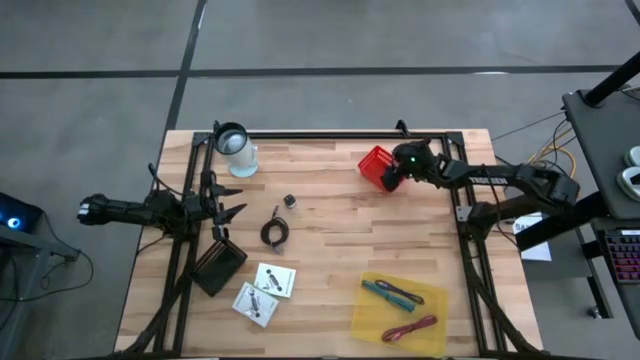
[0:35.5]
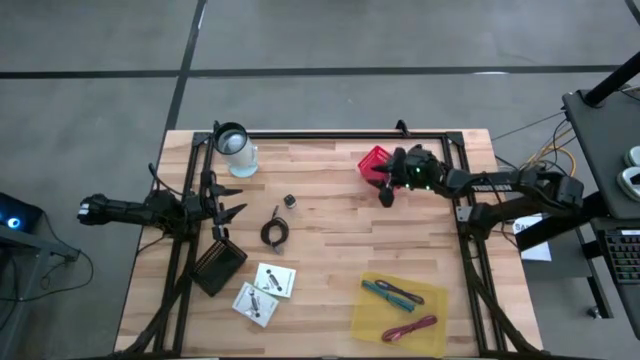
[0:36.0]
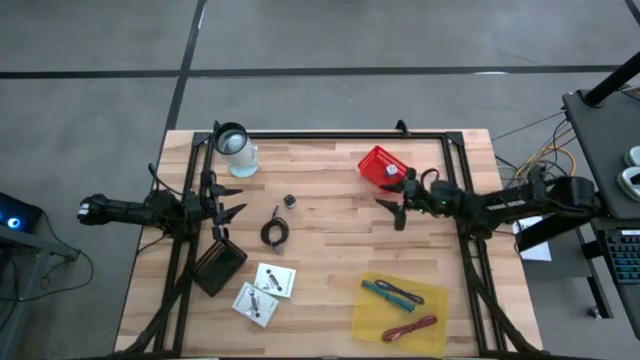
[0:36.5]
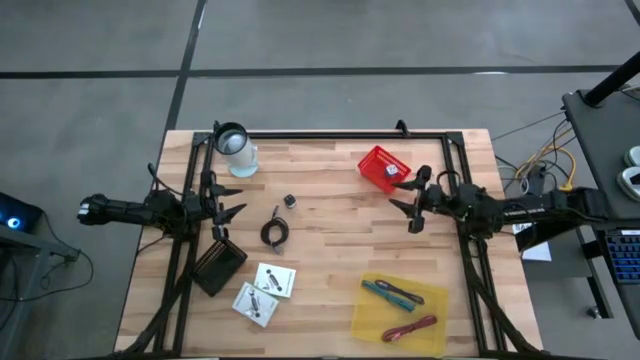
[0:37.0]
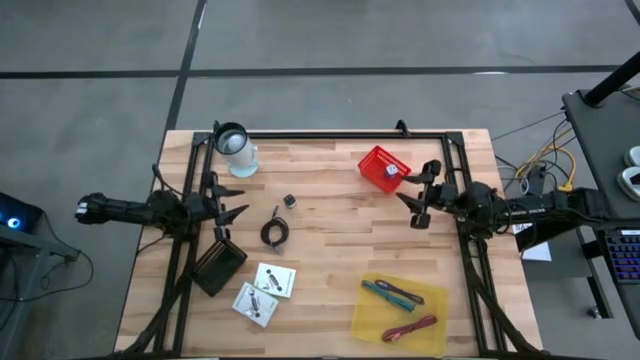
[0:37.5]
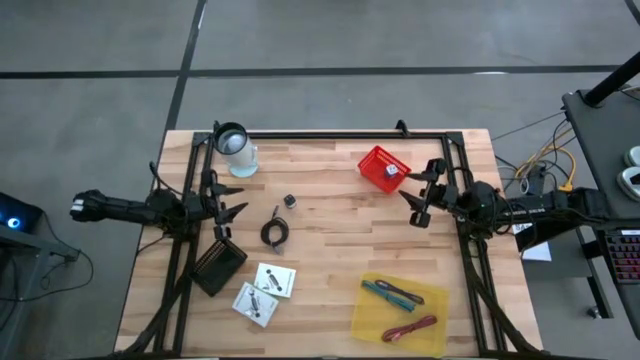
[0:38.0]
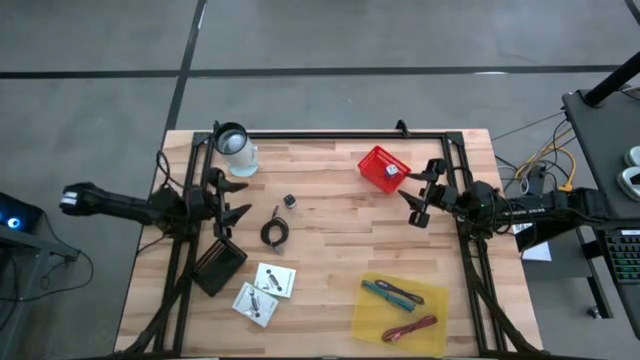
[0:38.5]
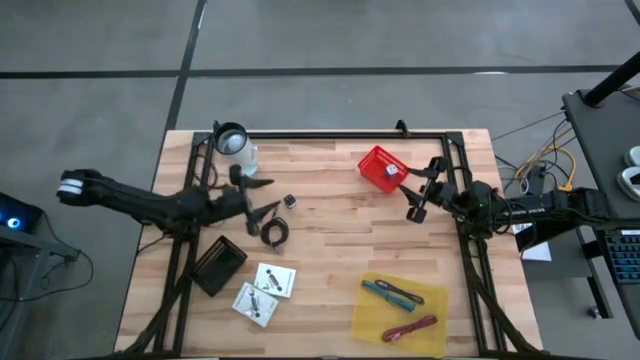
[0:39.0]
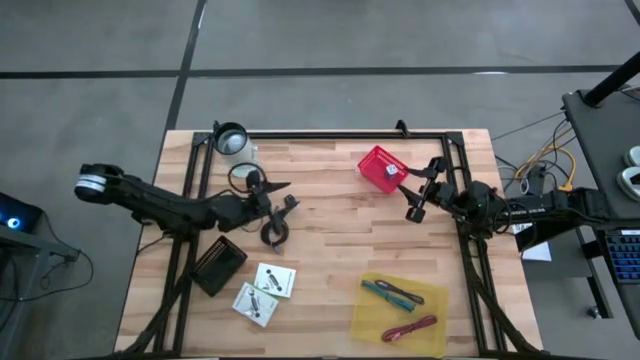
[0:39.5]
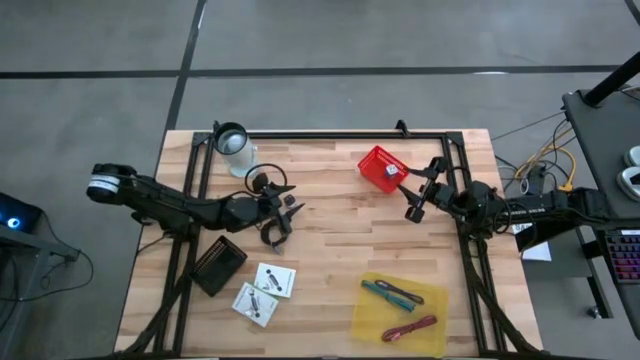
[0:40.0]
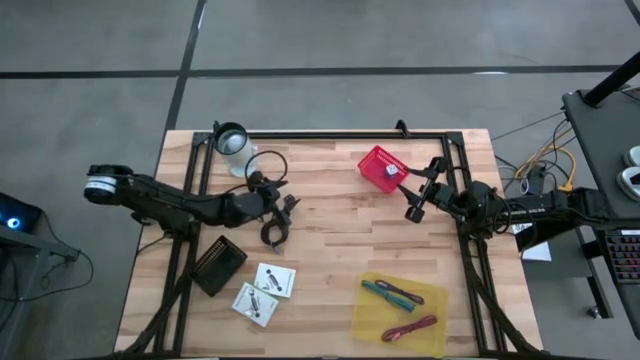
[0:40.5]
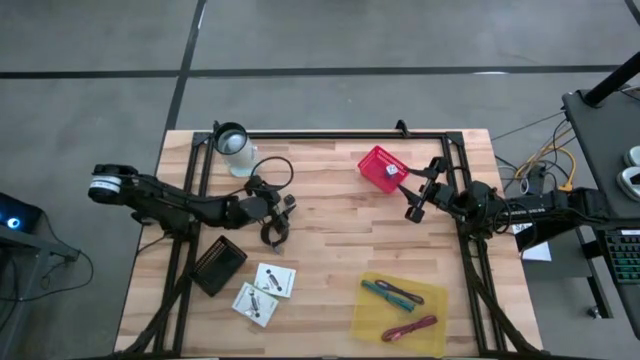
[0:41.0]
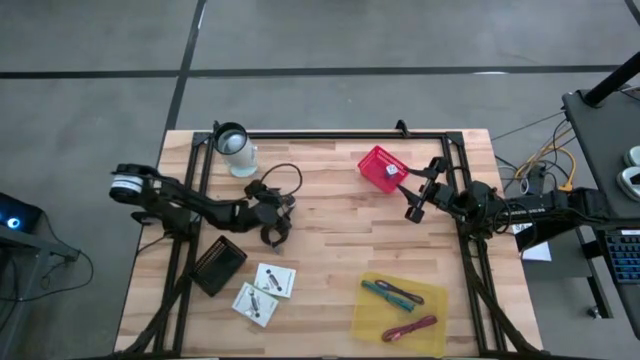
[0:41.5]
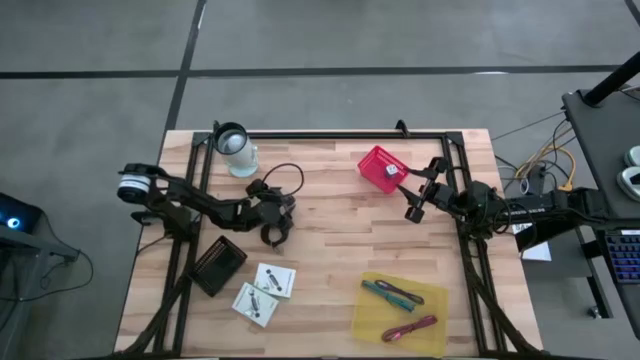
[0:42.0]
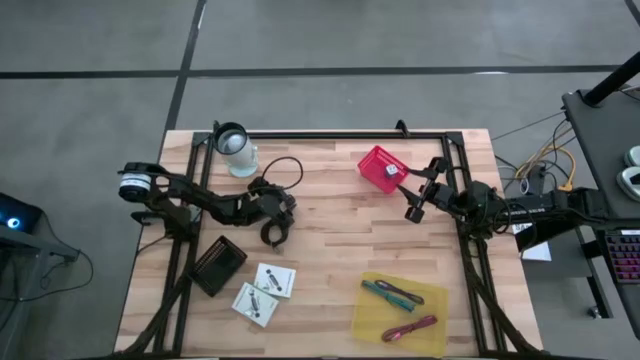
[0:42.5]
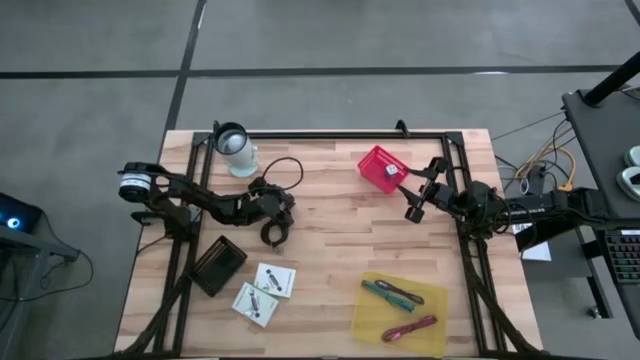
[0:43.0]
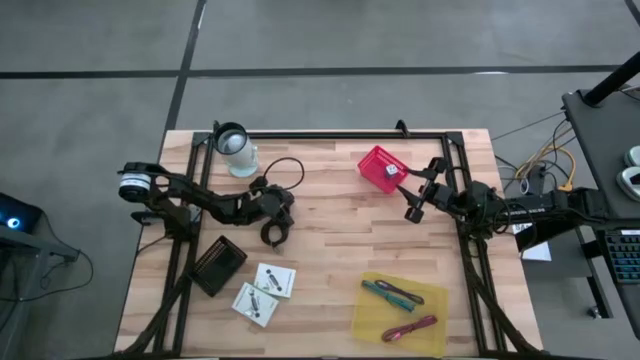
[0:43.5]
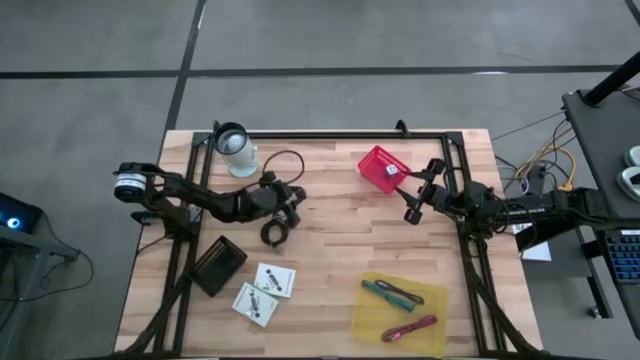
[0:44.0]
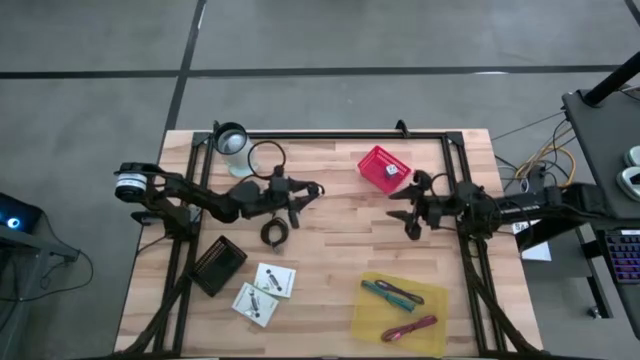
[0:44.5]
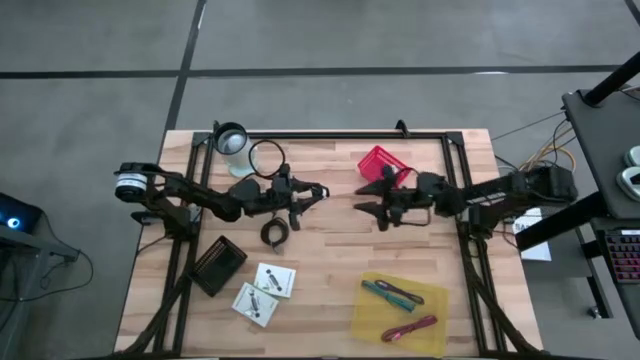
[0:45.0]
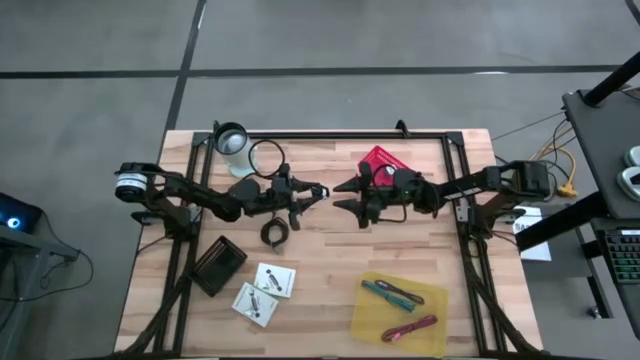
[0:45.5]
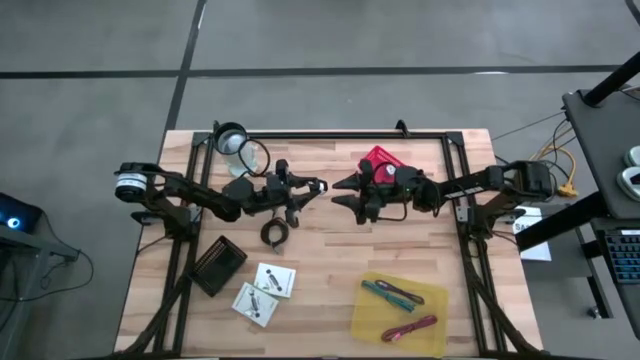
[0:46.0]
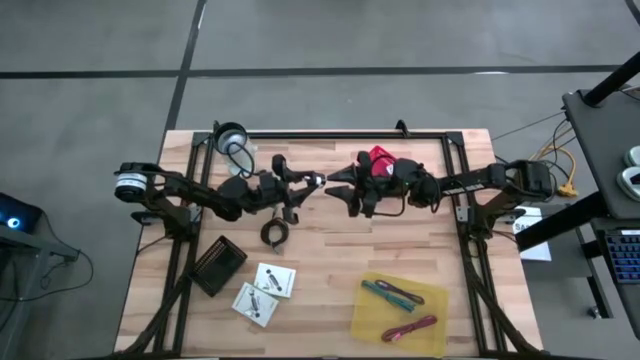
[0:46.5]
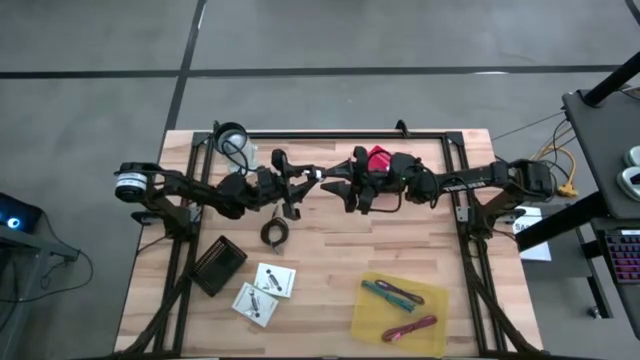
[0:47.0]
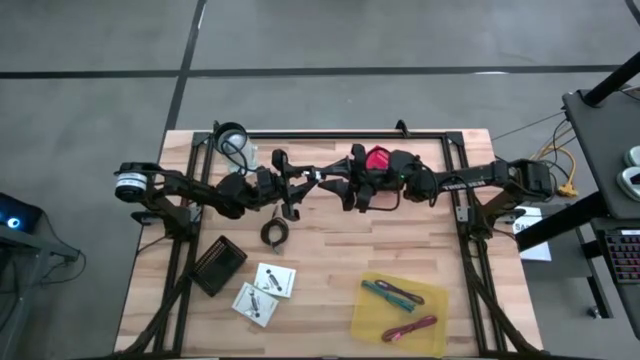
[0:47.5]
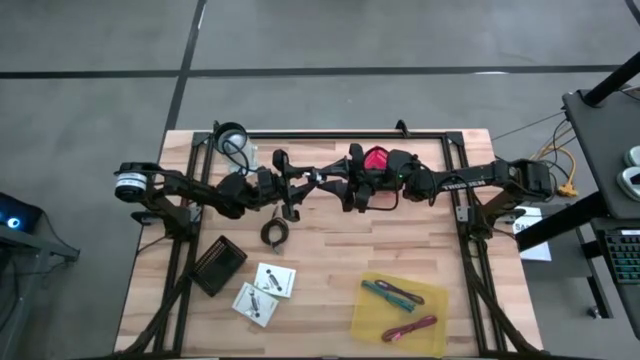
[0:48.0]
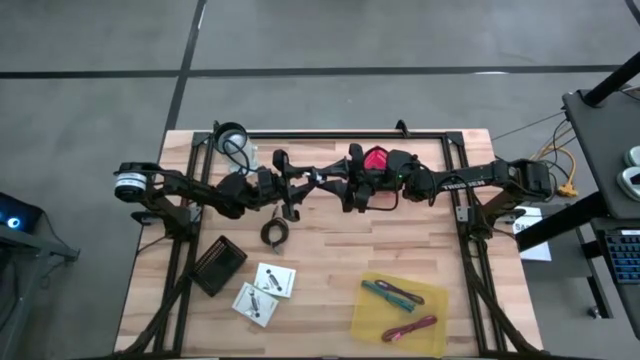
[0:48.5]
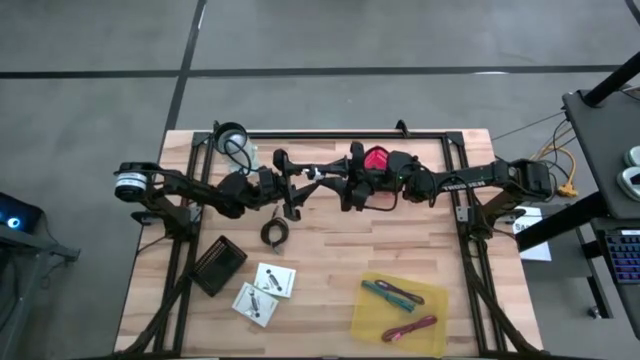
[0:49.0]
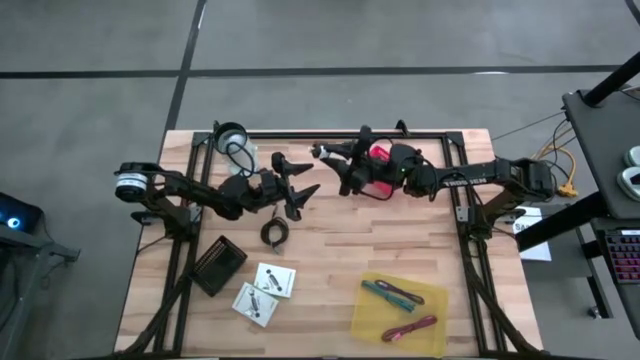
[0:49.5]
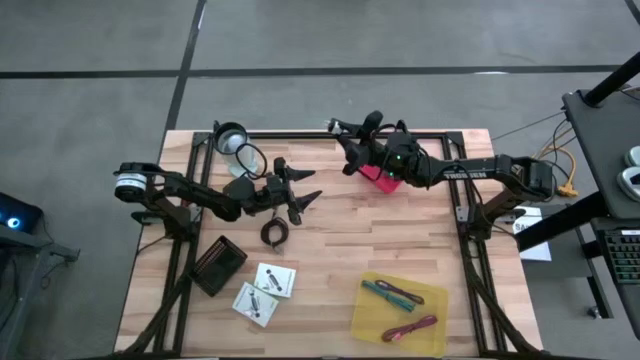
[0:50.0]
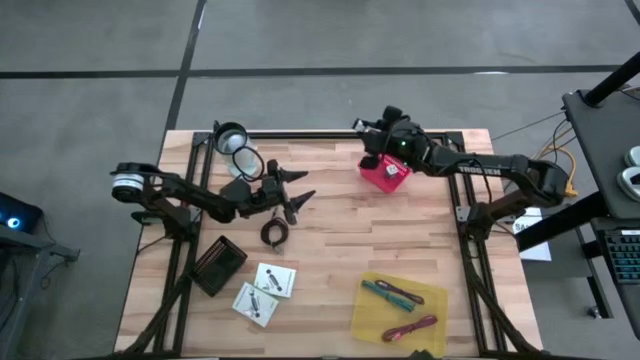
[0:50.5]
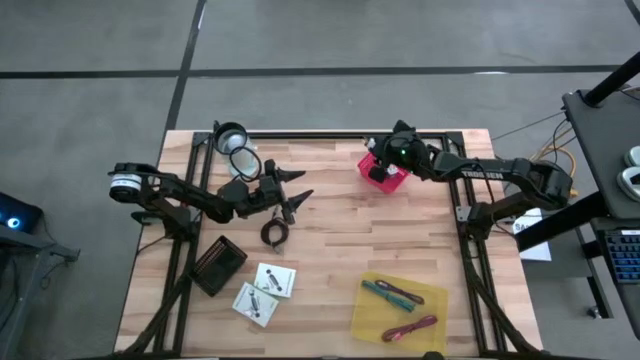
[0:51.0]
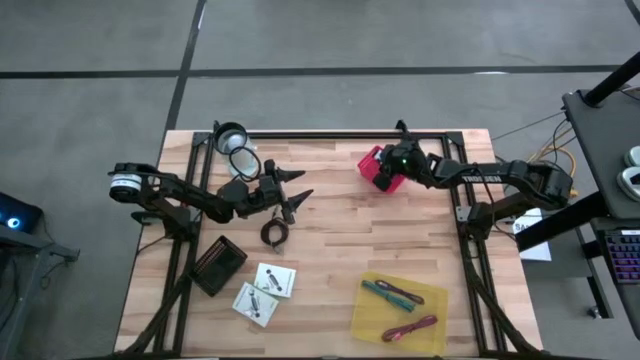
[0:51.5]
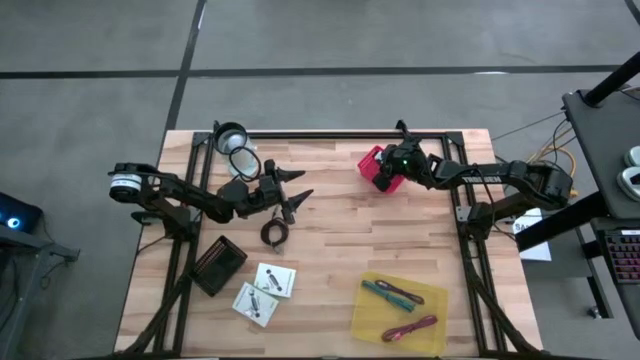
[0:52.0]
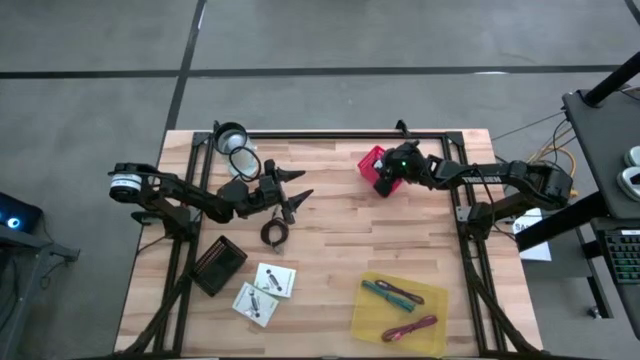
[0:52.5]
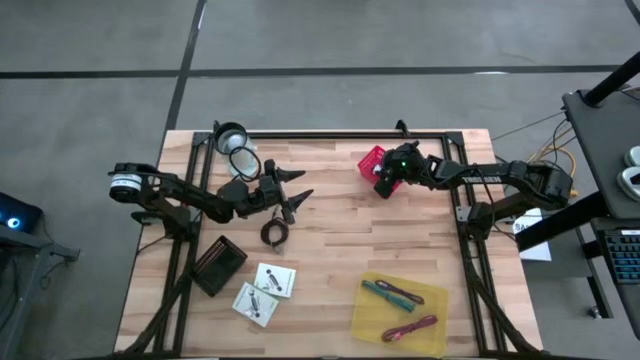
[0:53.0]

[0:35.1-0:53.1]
Task: Pick and place items into bin
Put the black charger adapter into the orange bin

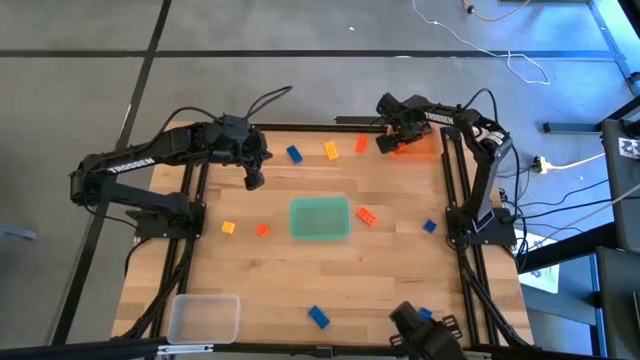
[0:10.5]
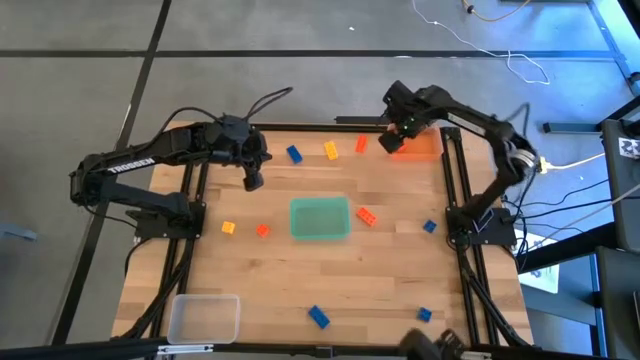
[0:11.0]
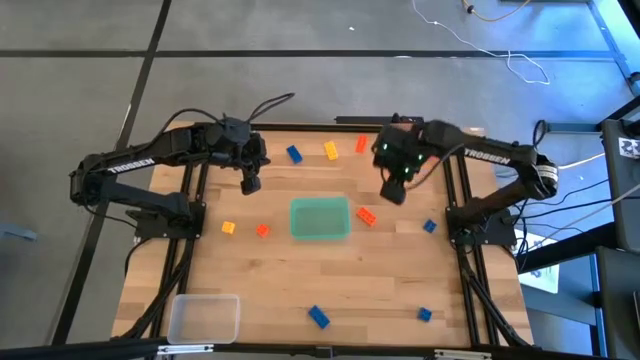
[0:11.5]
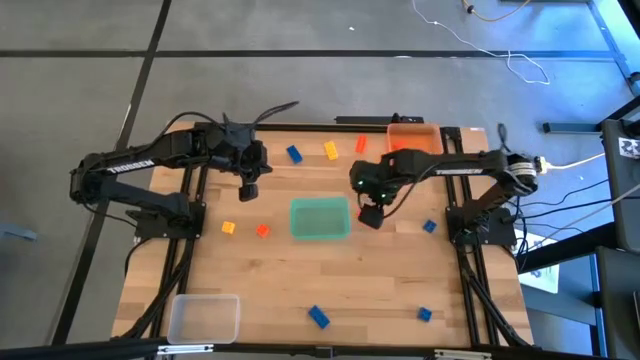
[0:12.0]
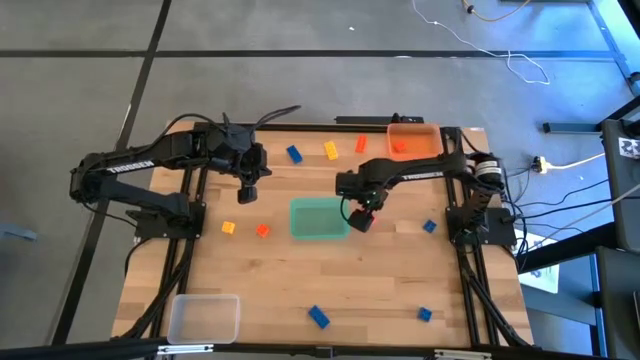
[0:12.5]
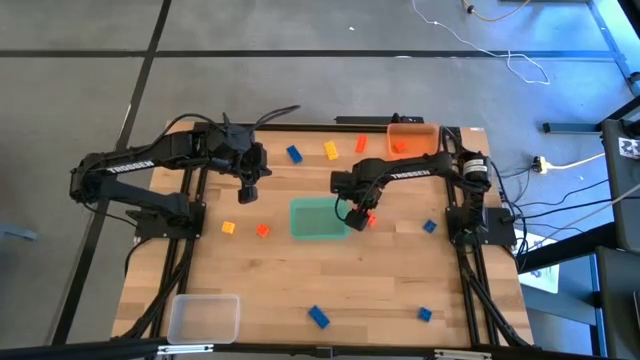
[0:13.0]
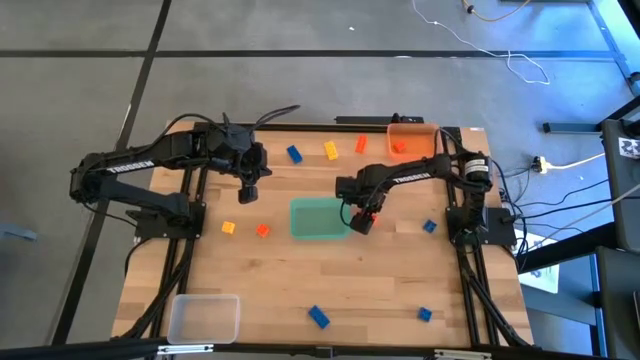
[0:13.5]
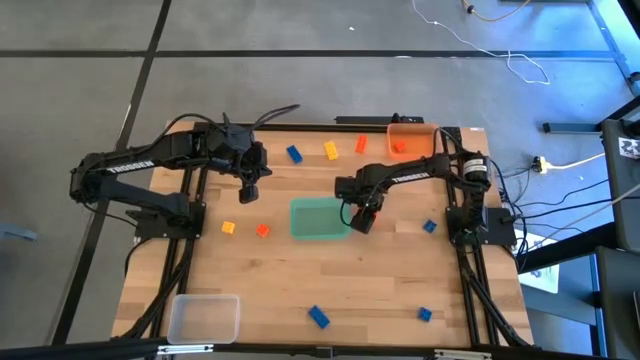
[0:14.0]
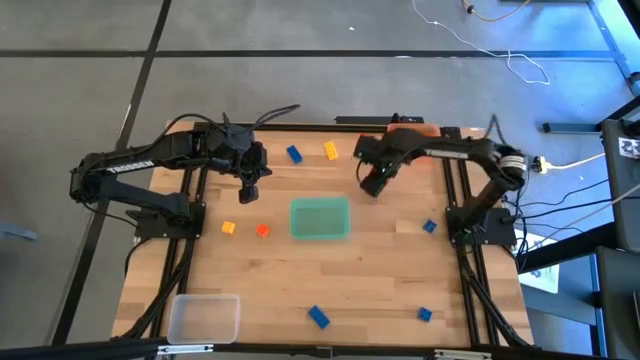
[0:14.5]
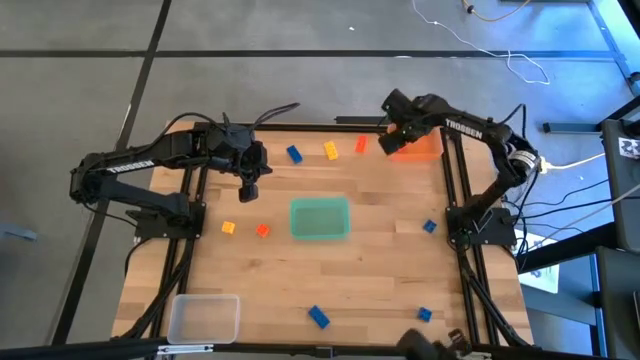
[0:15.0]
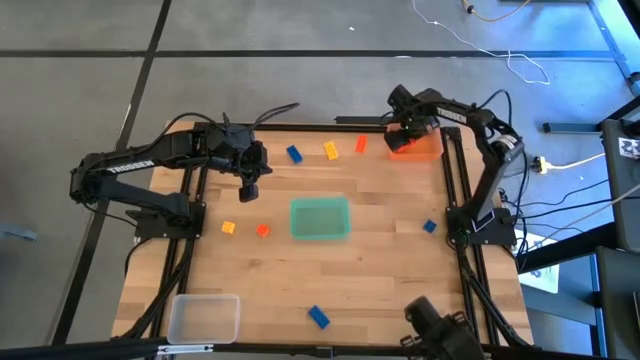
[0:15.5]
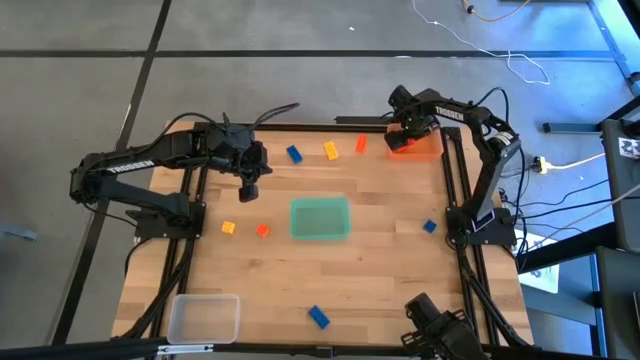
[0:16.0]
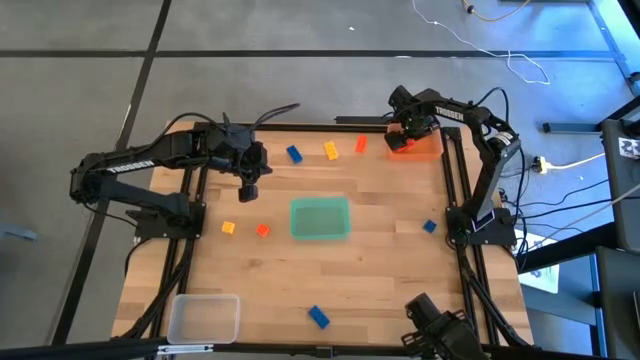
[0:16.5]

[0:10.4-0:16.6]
Task: Sort & place blocks by color
Put the orange game piece into the orange bin
